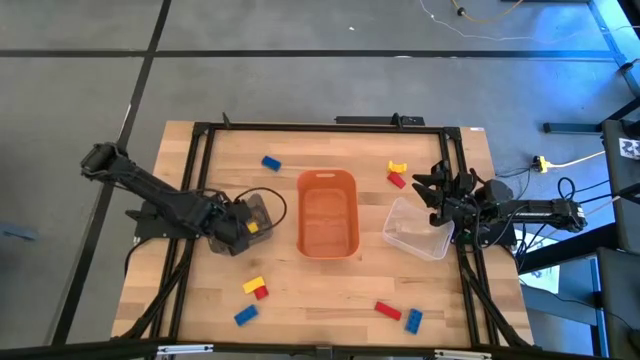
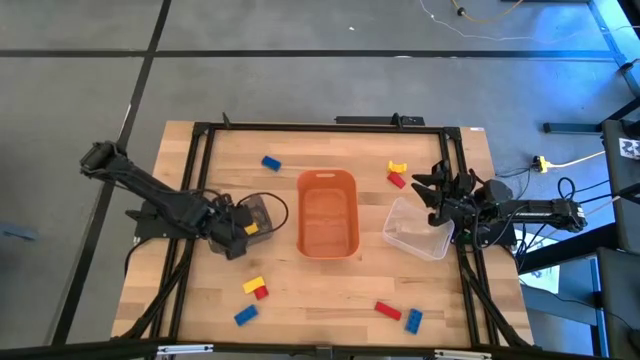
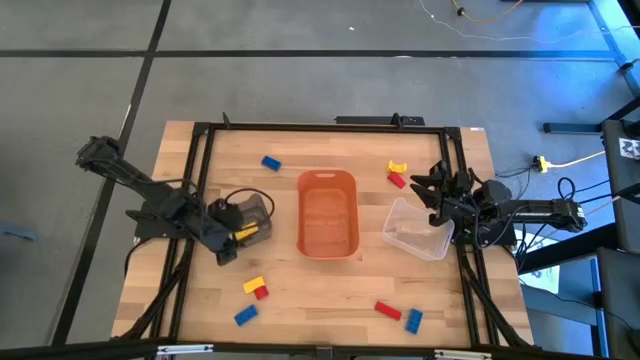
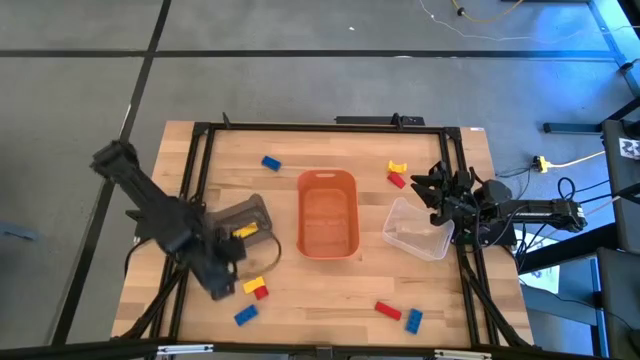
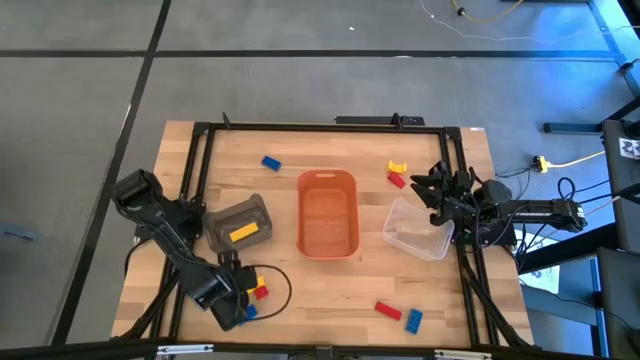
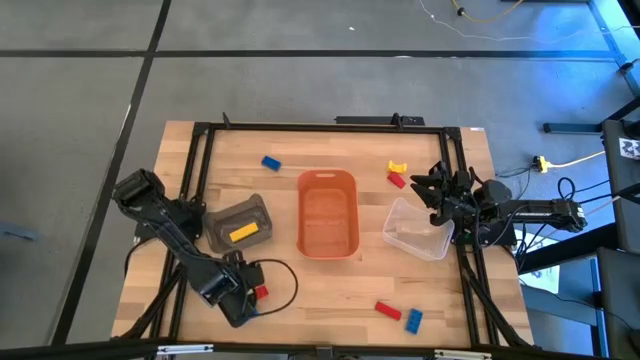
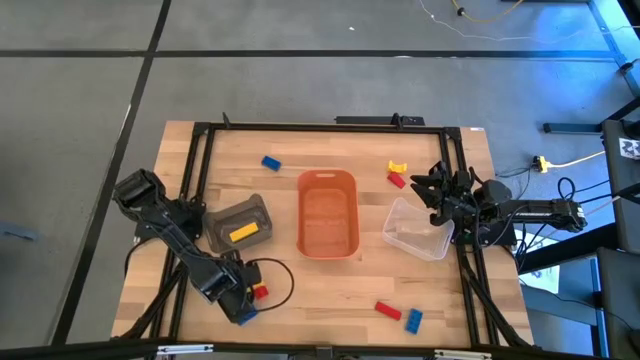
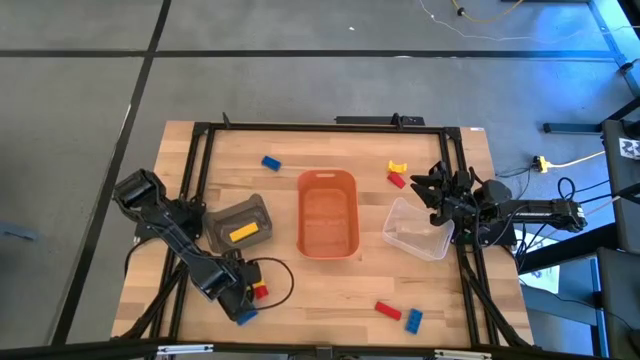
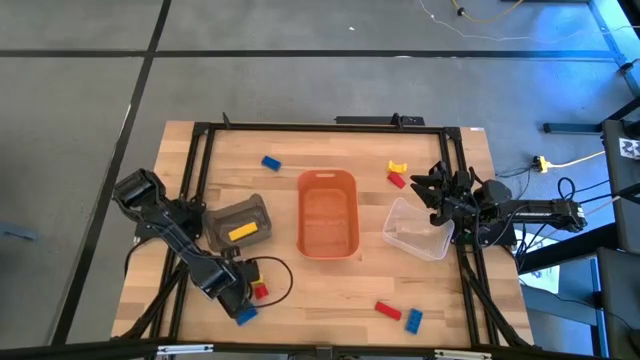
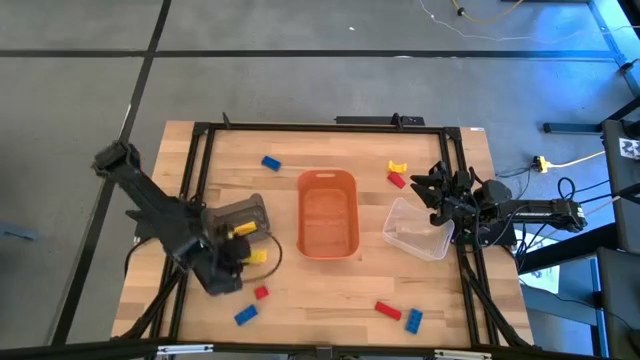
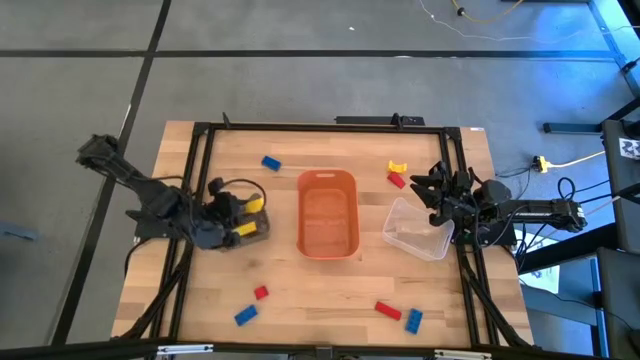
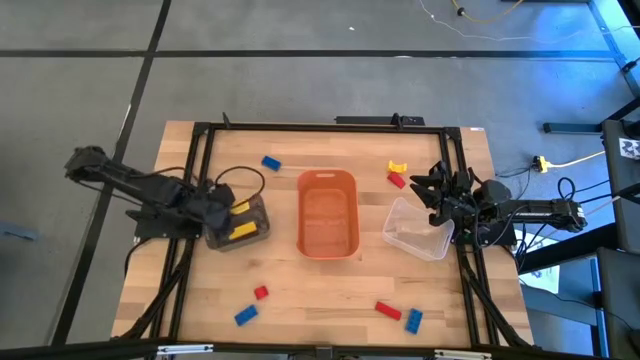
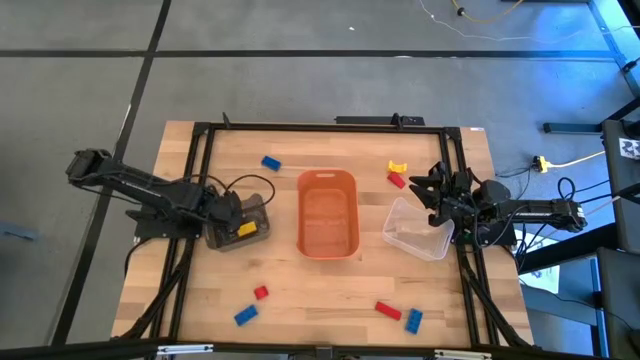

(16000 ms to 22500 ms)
Task: Sort & place blocks by color
Put the bottom yellow block into the black bin

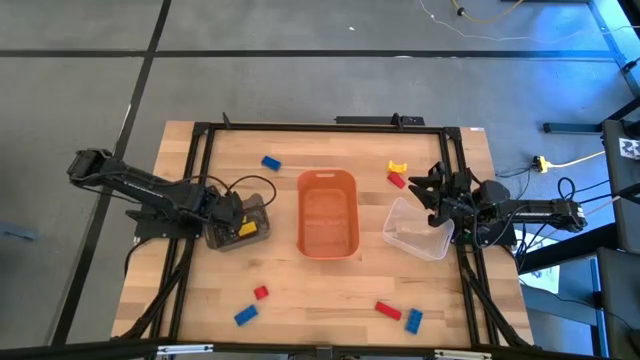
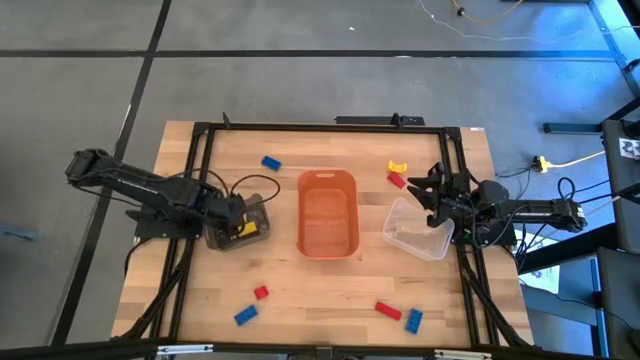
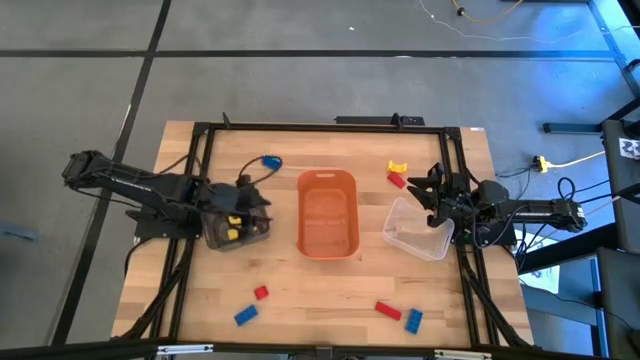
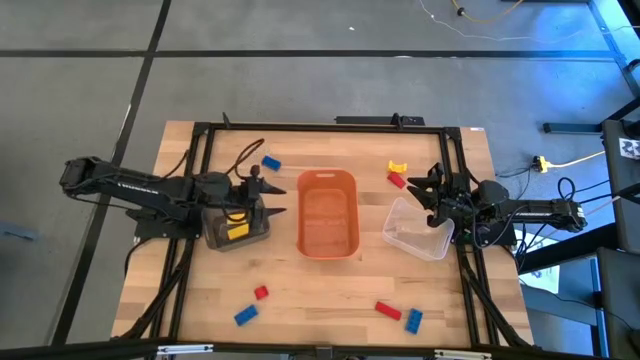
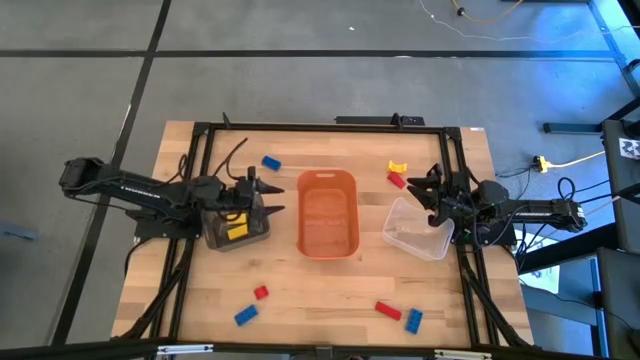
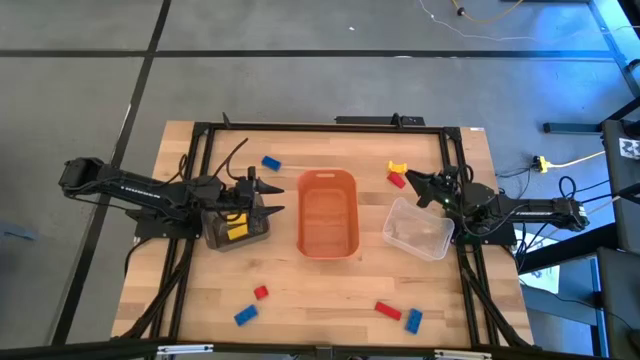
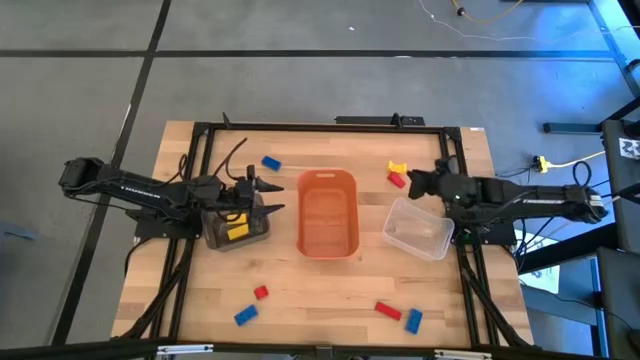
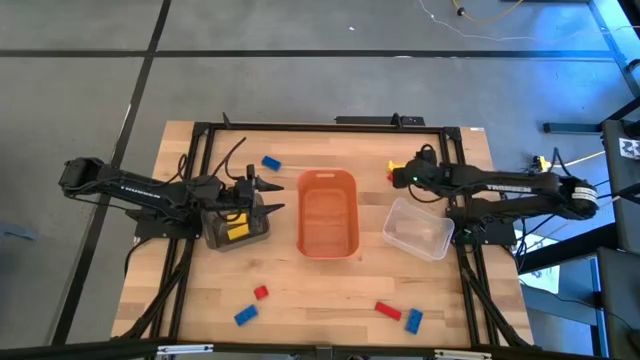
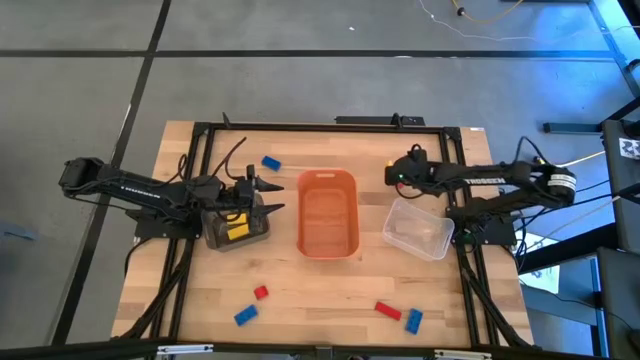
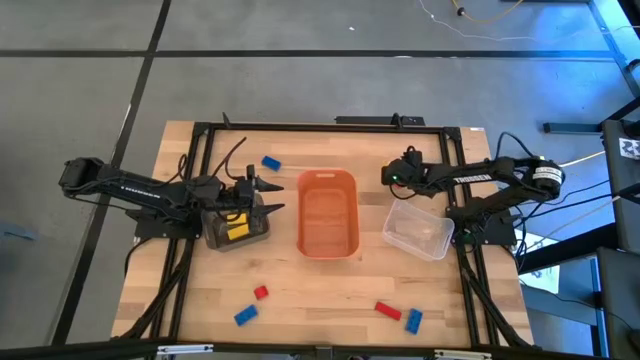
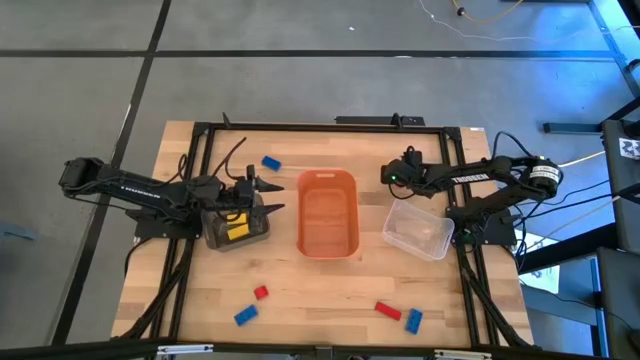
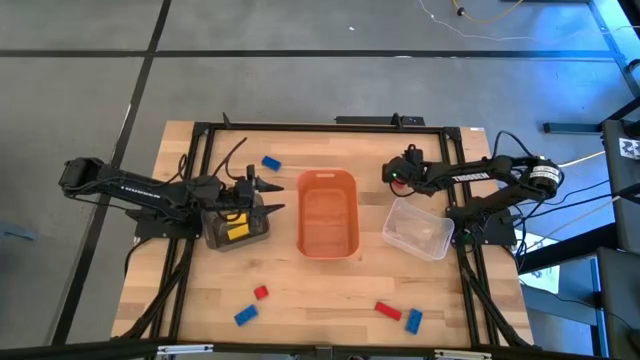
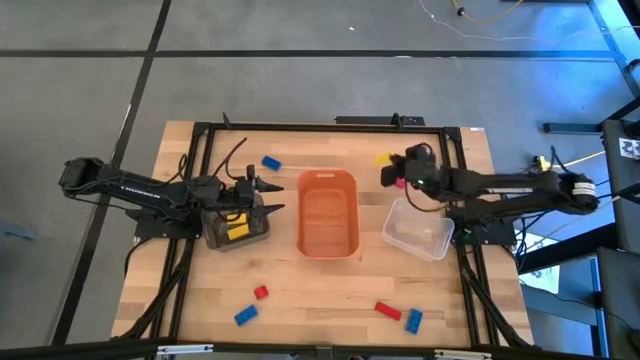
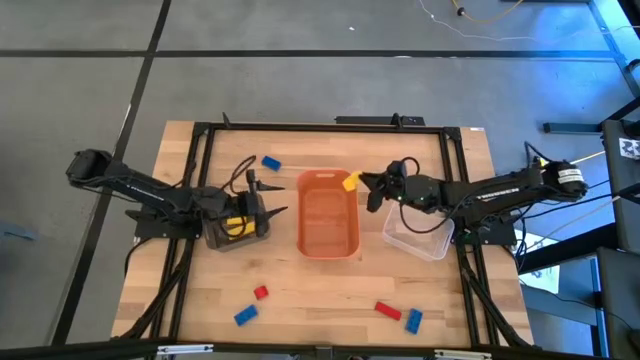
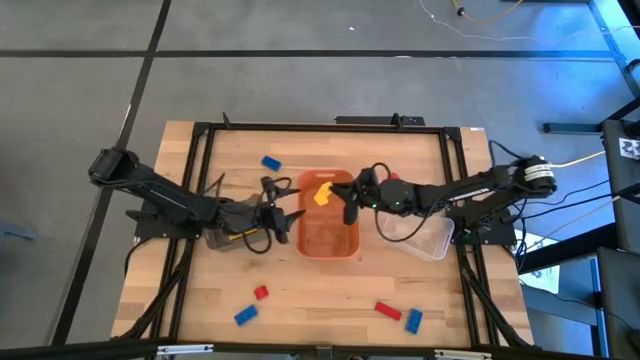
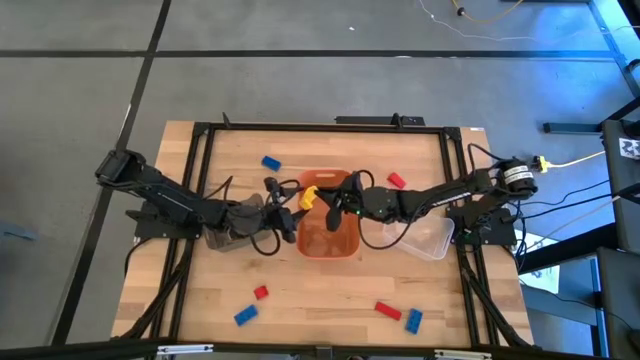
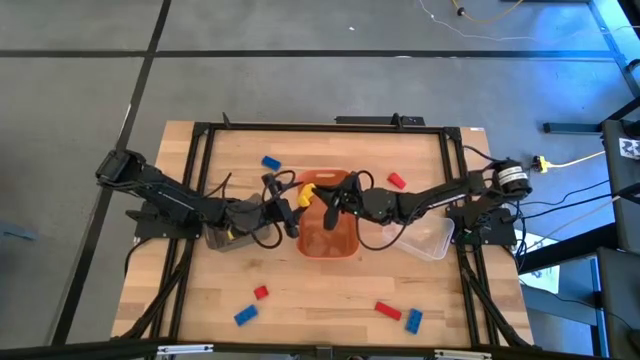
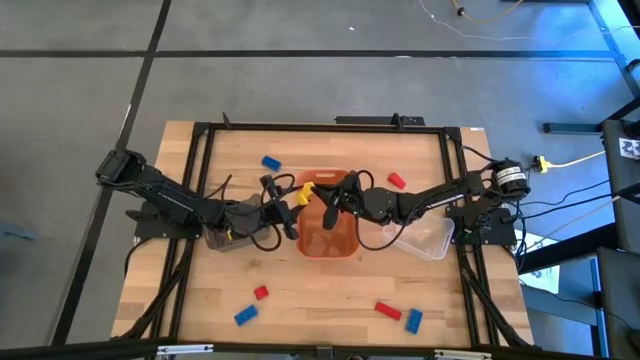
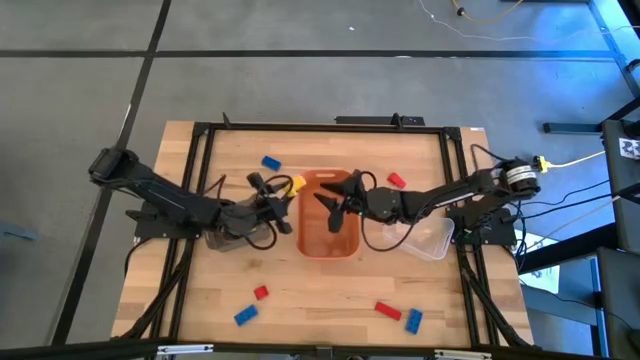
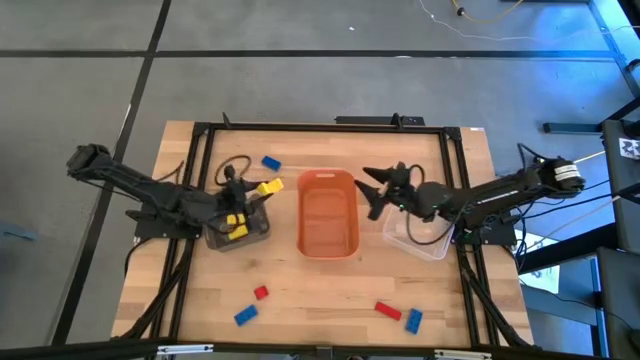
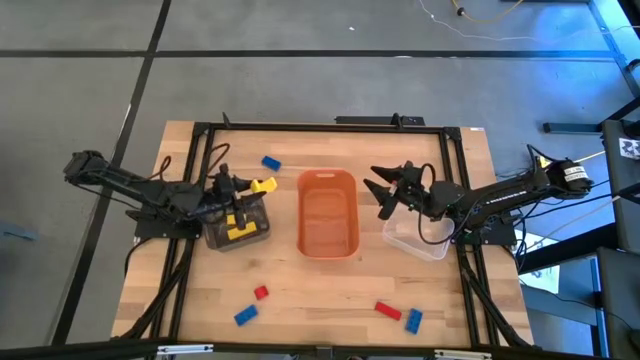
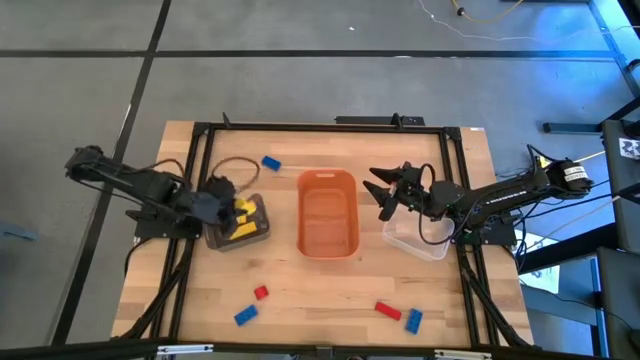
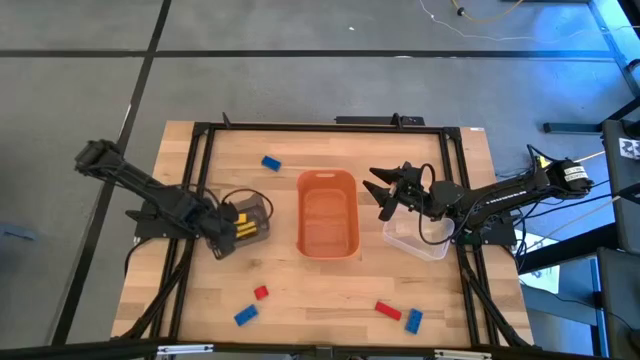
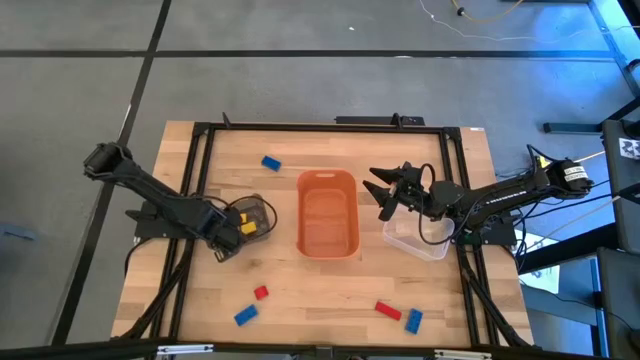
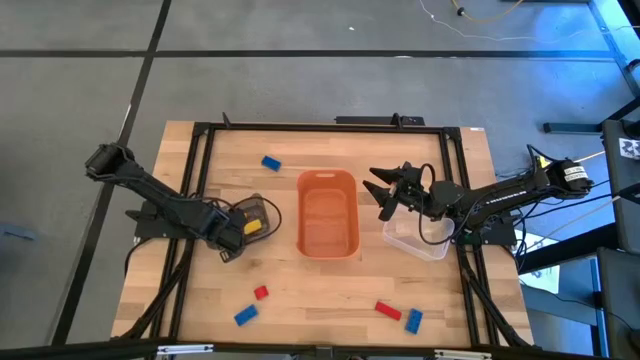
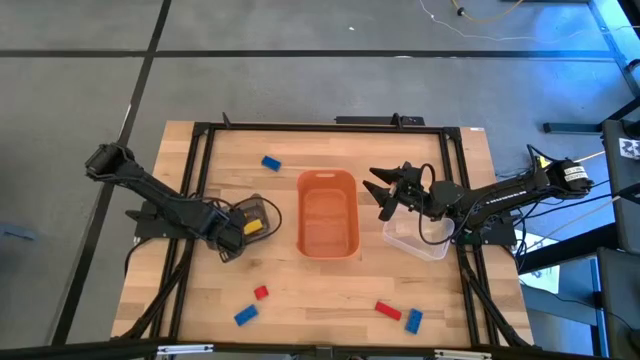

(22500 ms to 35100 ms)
Put the yellow block into the black bin

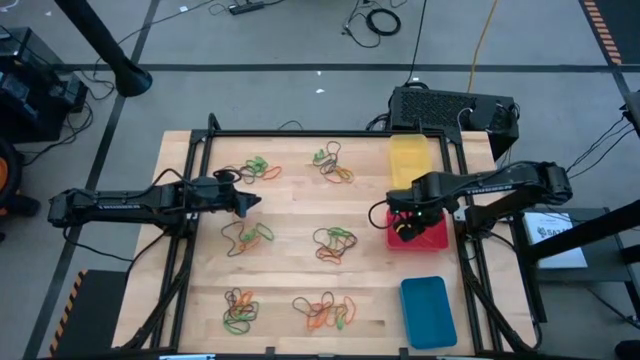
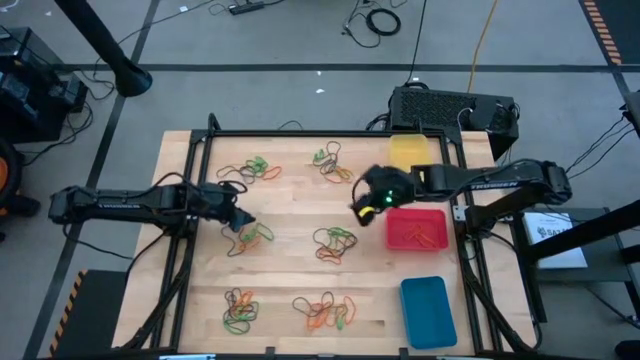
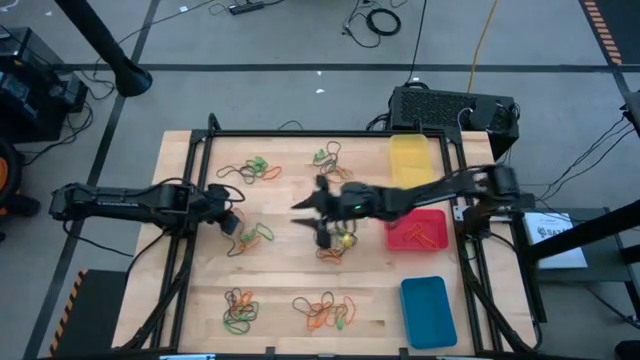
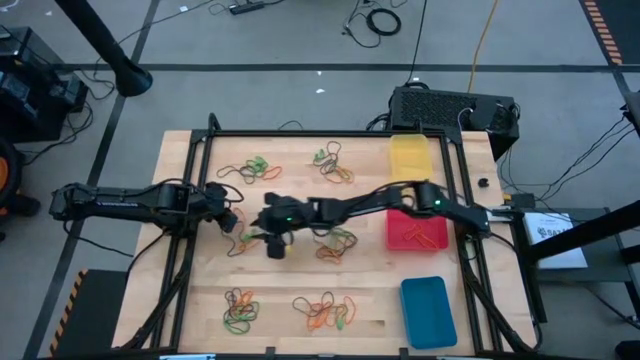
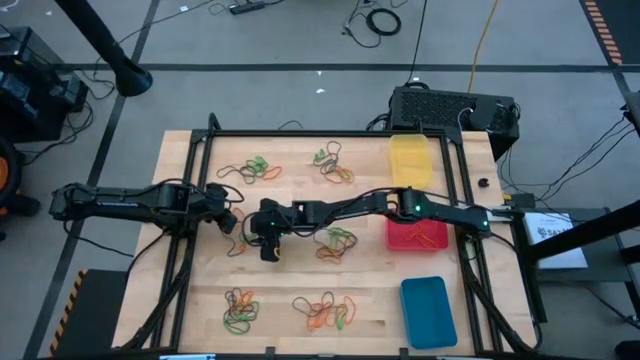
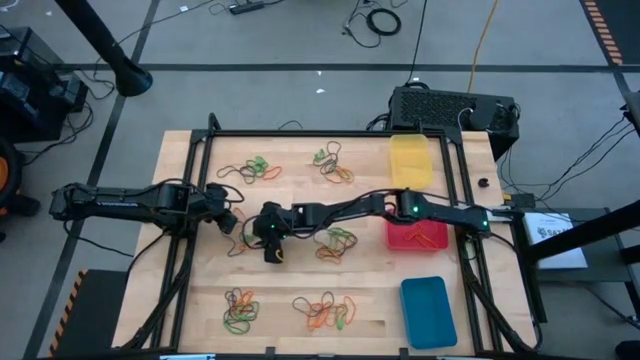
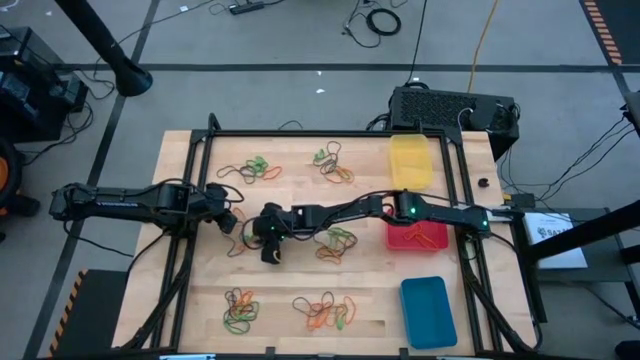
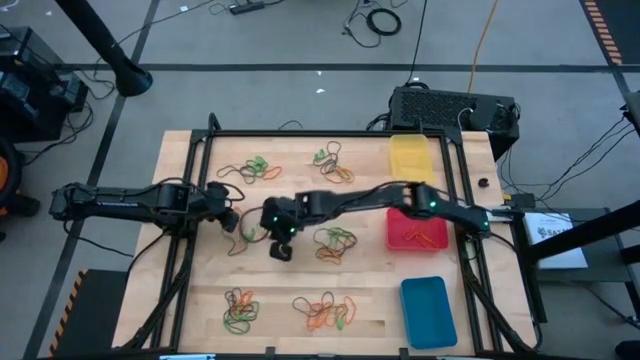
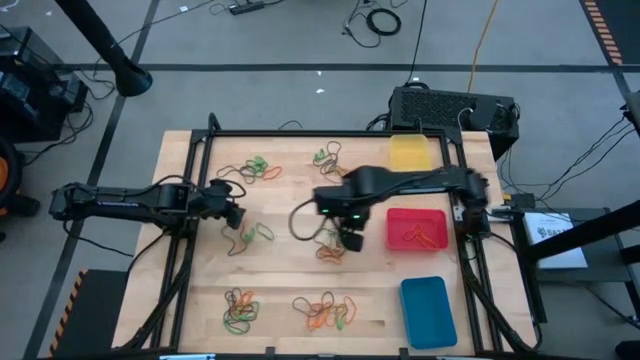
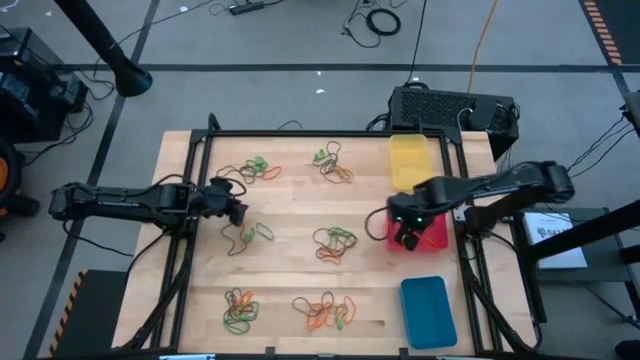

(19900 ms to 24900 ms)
Task: Sort rubber bands into baskets
Put the orange rubber band into the red bin
